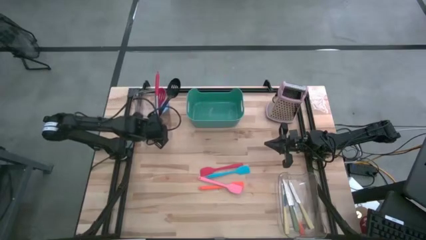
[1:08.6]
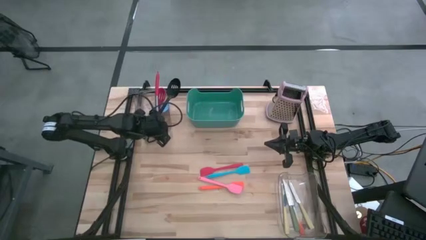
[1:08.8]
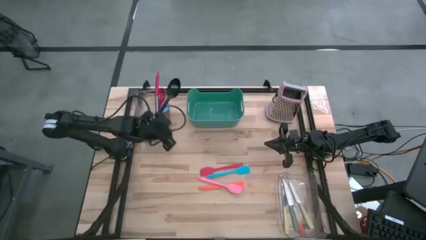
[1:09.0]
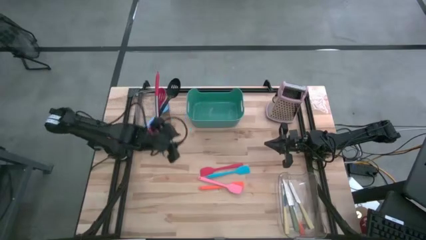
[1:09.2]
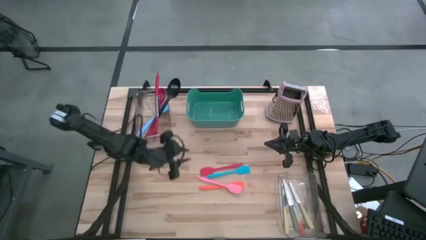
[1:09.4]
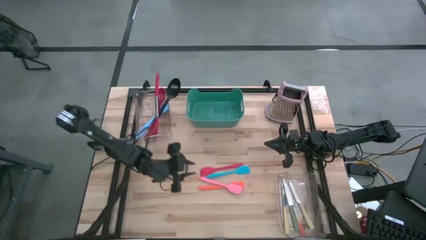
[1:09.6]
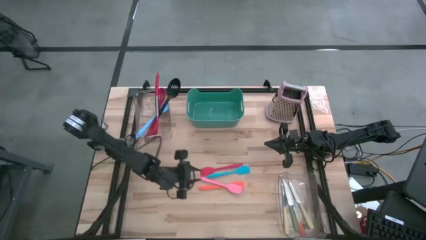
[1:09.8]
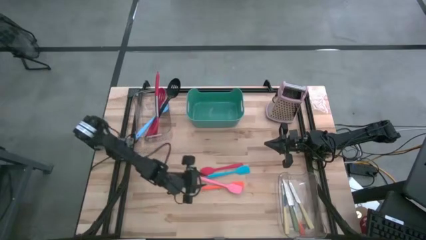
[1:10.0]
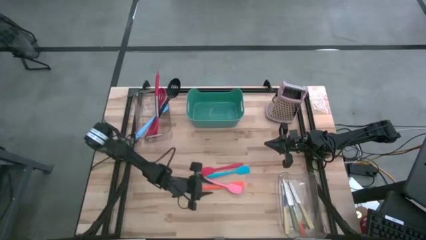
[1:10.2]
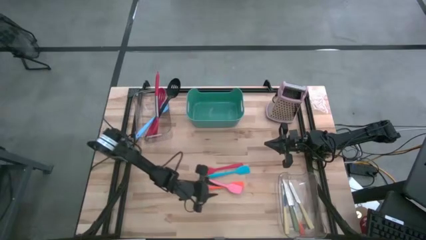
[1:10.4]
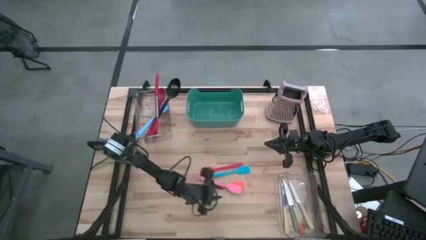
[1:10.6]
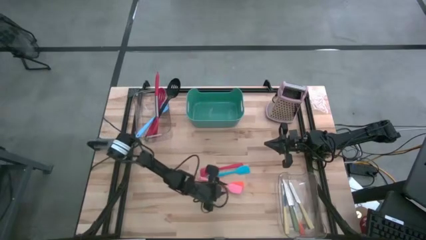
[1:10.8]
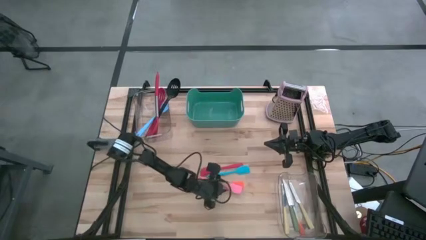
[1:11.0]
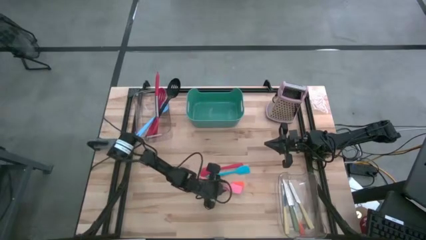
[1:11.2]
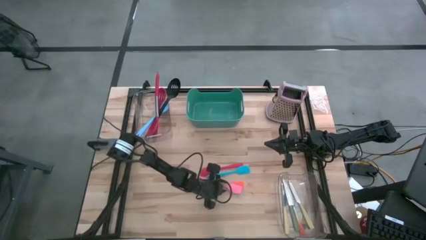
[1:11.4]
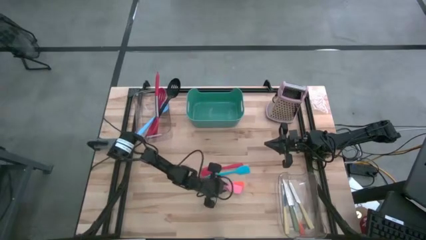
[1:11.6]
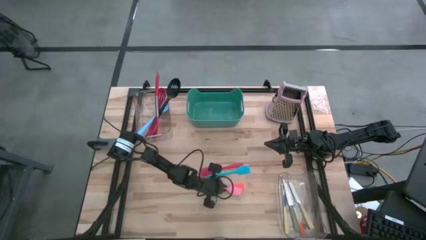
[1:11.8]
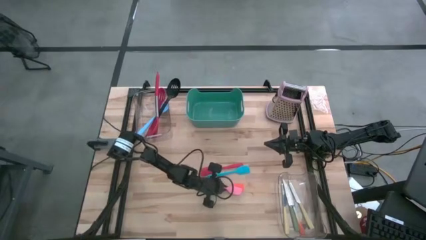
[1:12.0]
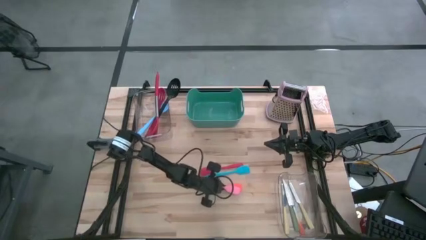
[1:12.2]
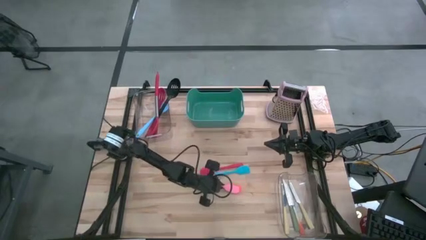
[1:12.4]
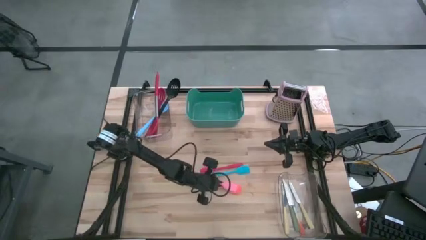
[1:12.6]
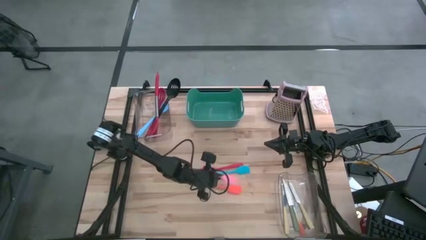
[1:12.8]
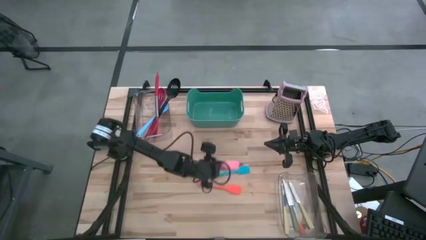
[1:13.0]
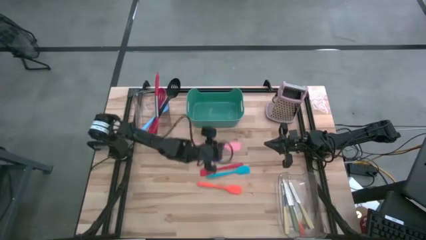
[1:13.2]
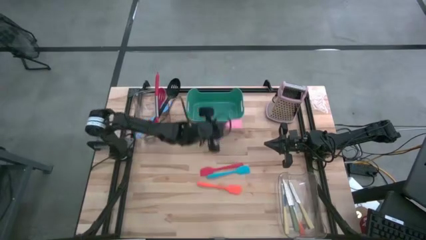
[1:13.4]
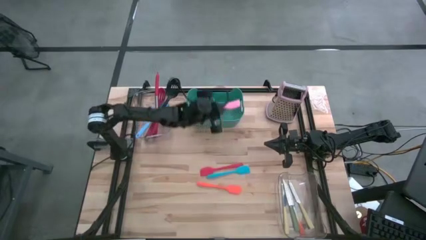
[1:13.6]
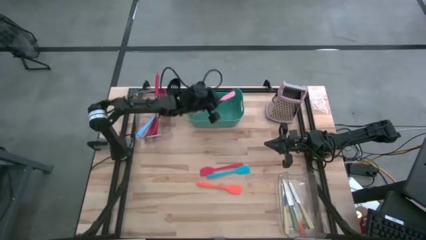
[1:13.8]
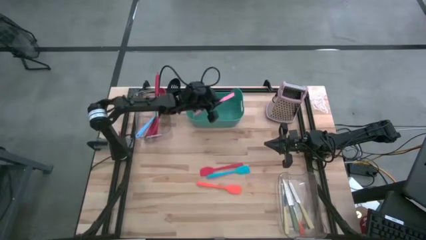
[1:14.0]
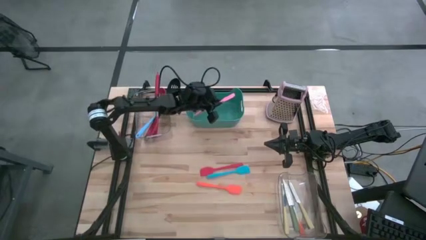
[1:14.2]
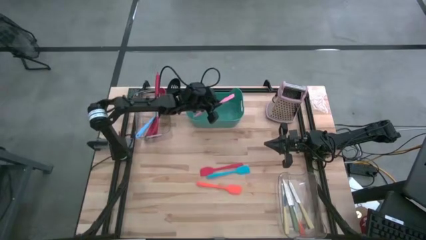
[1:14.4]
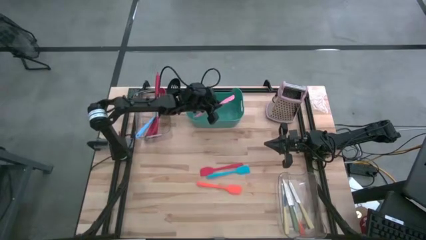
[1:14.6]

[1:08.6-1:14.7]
Task: Pick & Place Kitchen Items
Put the pink spatula into the green bin

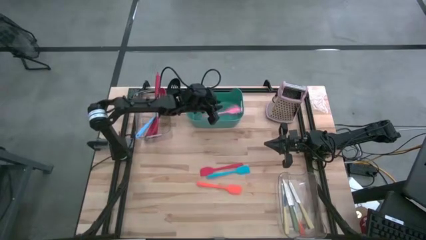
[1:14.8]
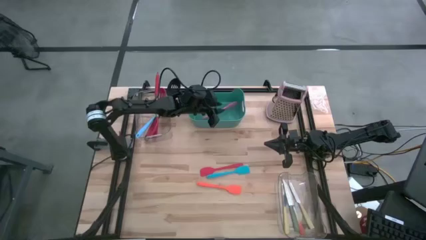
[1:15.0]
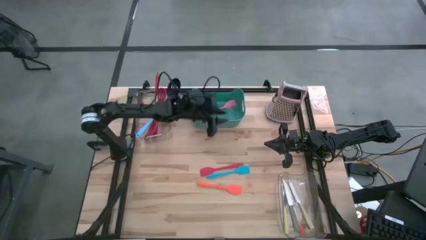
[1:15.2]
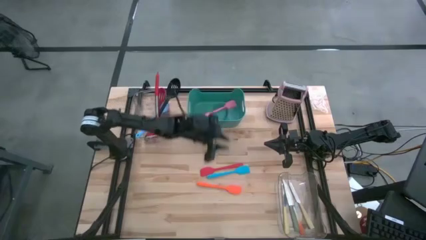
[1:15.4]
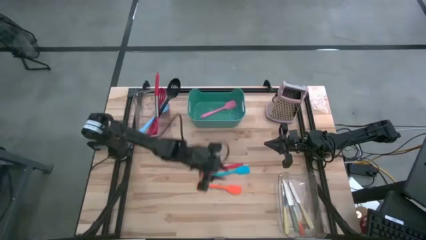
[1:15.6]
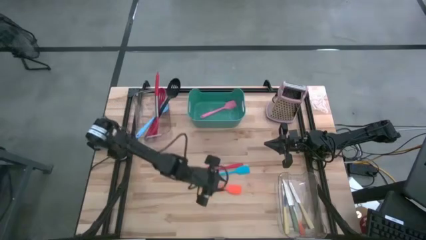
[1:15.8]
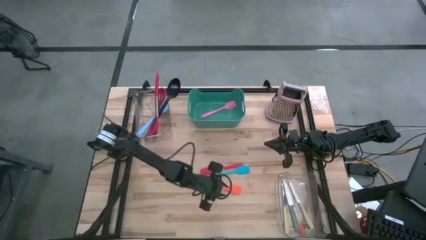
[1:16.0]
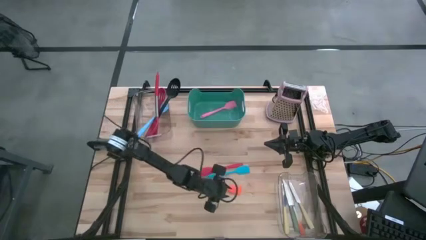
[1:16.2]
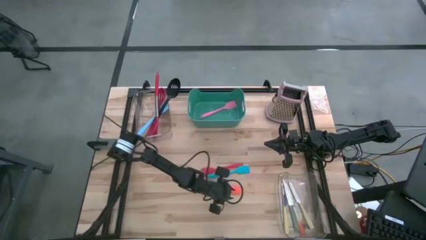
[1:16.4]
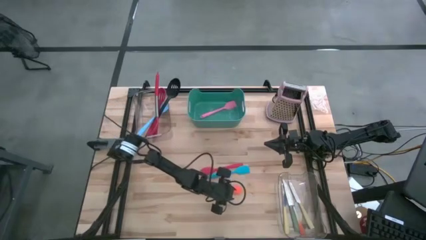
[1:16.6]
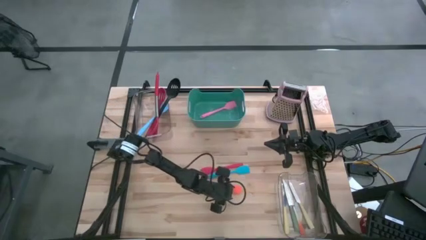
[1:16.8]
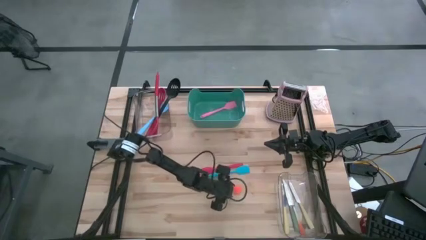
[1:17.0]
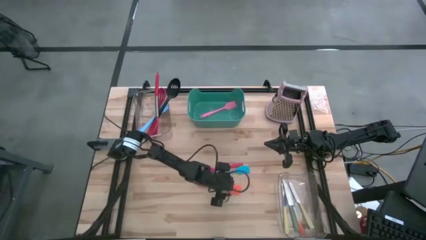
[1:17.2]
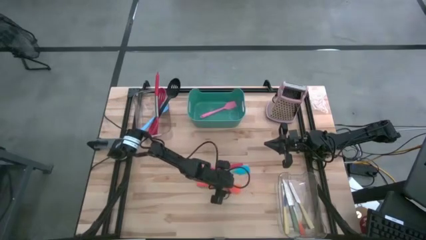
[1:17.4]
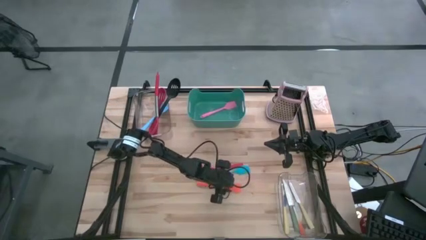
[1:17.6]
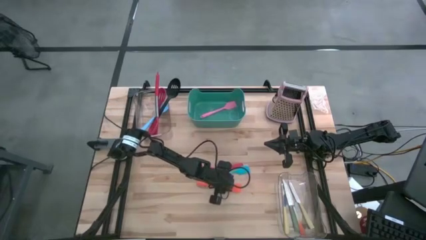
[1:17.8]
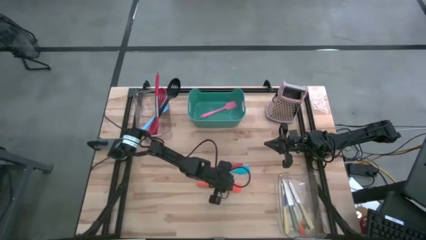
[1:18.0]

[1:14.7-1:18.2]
Put the orange spatula into the green bin

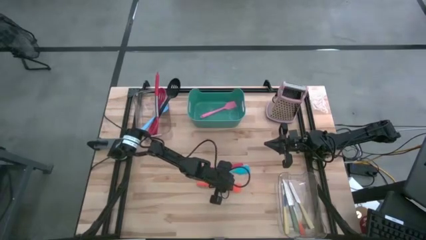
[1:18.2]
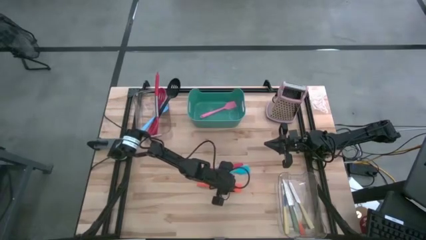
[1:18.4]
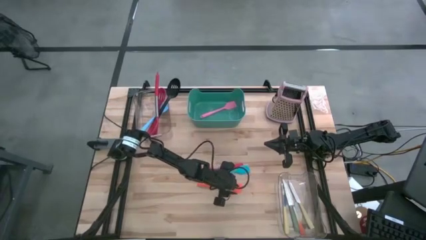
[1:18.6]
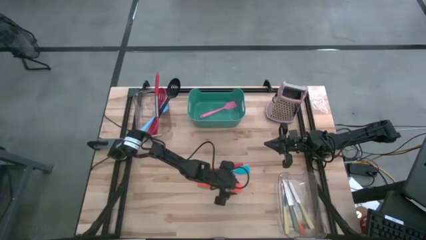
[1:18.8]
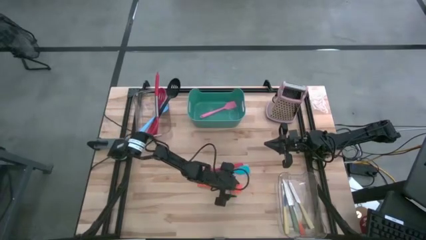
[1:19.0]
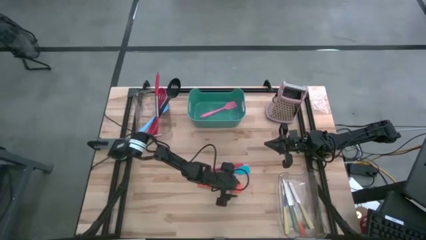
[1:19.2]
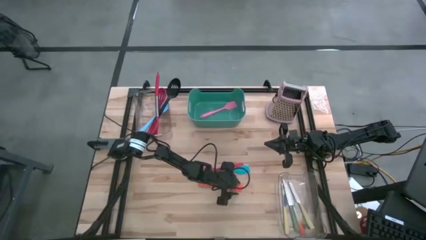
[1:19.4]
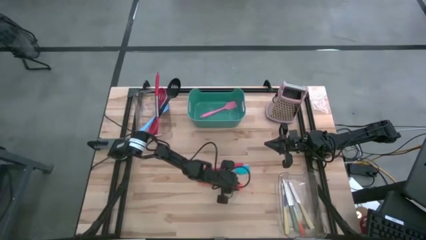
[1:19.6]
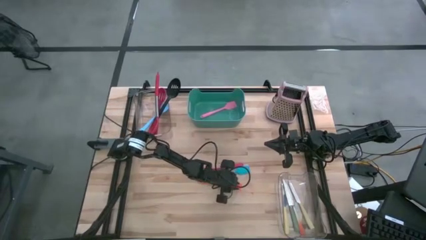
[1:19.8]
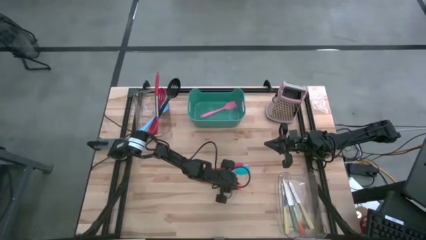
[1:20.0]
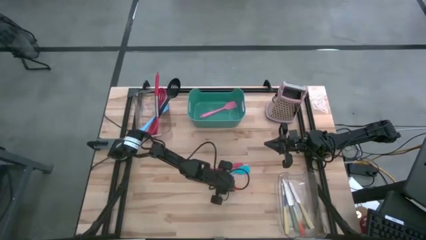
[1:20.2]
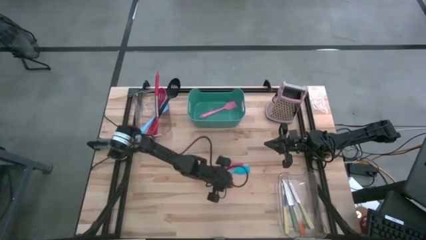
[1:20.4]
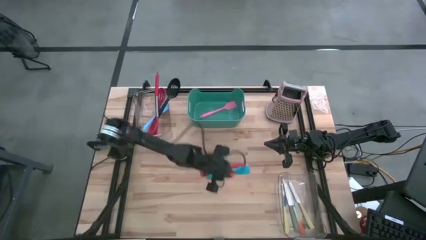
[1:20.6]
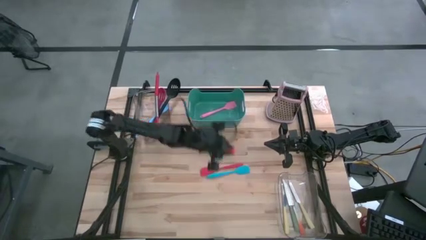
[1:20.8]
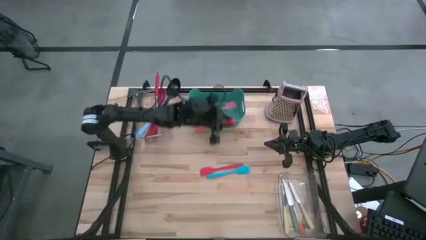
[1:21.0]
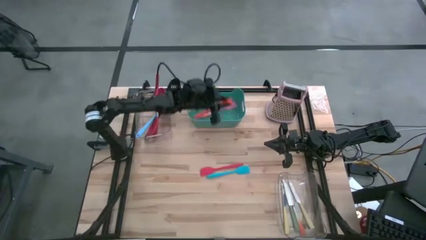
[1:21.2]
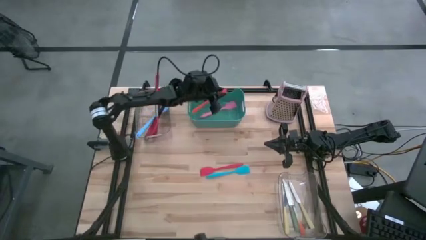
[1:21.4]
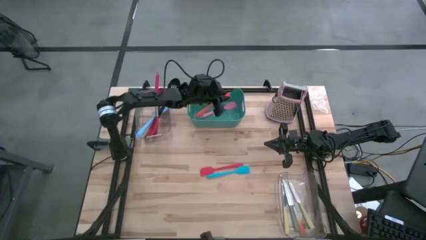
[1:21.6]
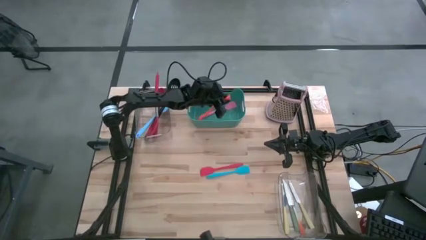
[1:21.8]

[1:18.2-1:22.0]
Put the orange spatula into the green bin

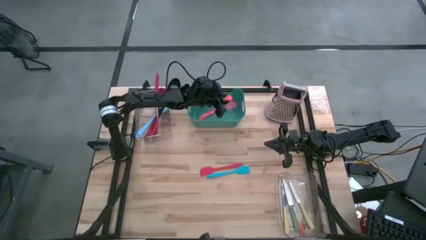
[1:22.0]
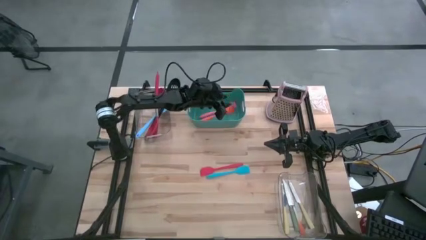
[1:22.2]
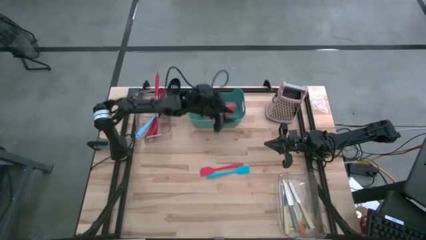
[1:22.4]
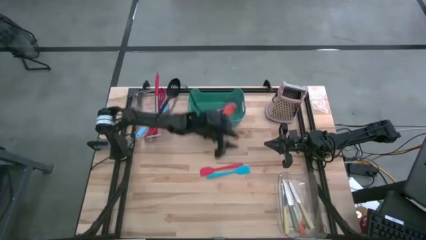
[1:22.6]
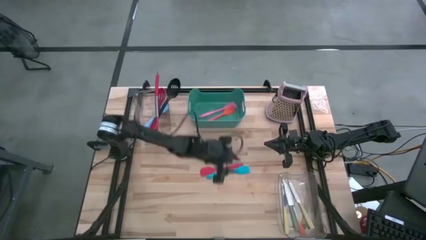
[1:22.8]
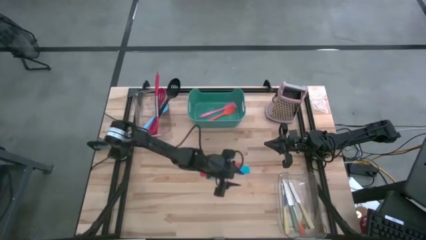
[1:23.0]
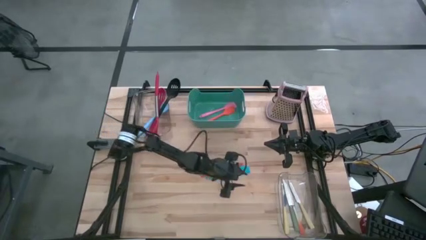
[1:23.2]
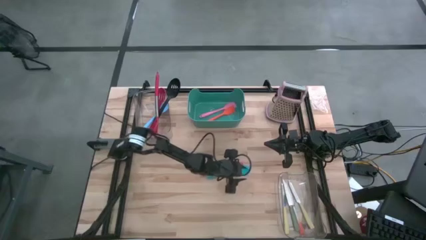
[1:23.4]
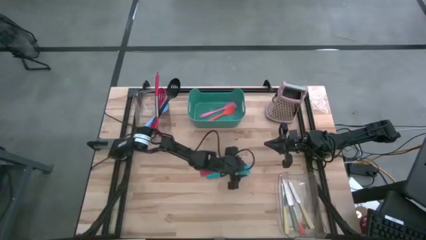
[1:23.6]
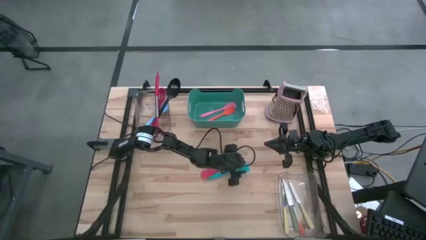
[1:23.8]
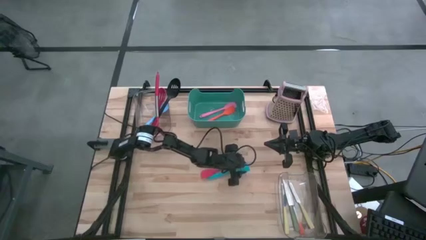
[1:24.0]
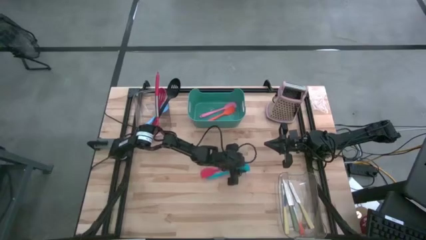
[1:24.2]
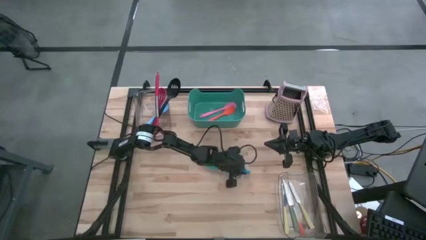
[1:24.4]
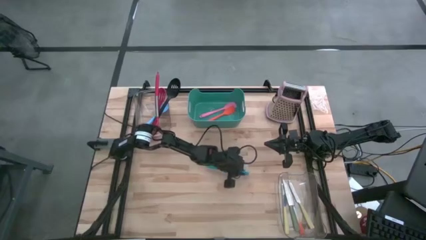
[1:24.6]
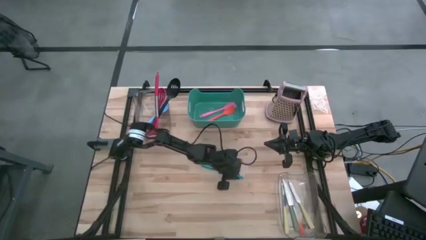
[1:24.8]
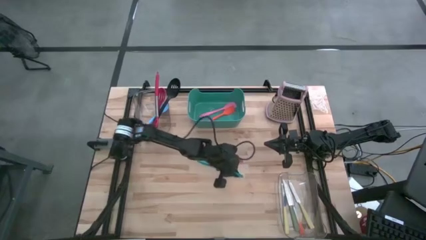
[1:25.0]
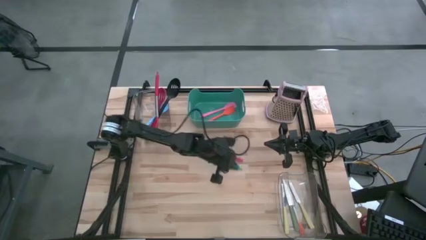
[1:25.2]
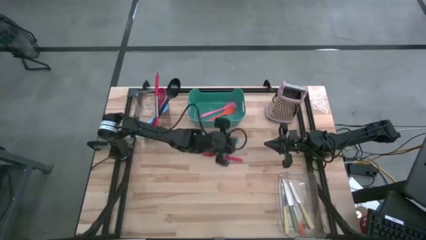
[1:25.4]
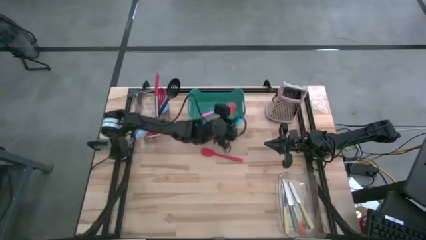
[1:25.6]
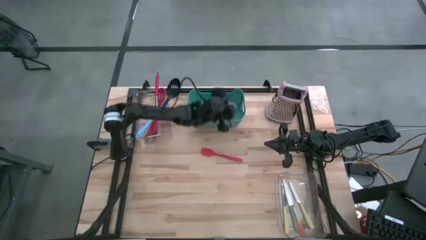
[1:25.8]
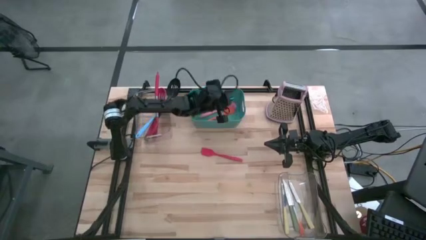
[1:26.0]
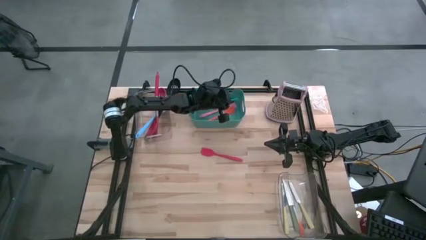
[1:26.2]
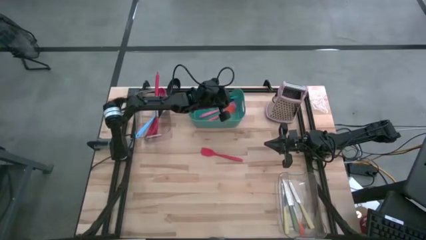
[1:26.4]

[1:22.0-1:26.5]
Put the blue spatula into the green bin
